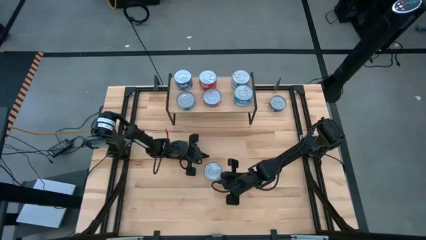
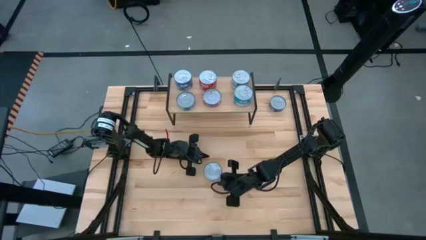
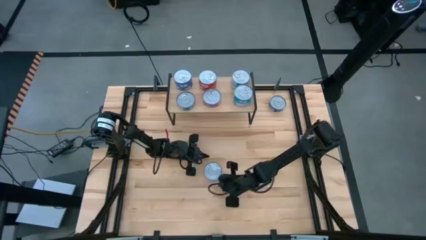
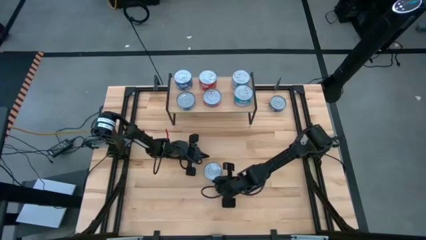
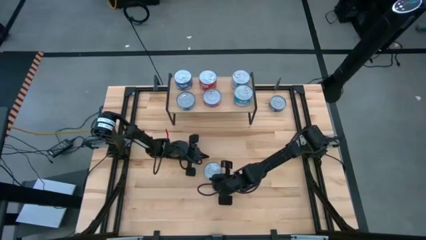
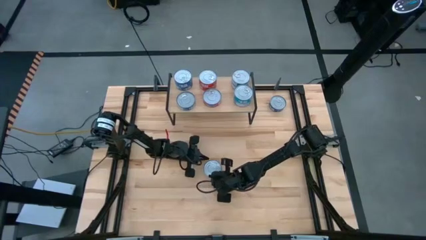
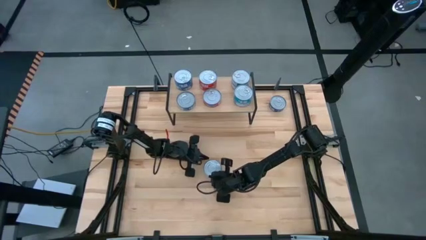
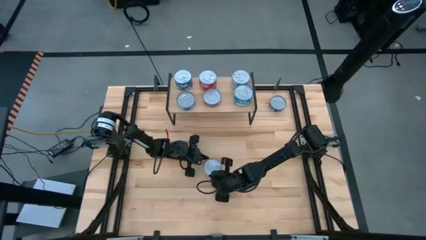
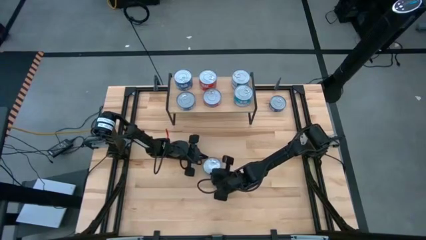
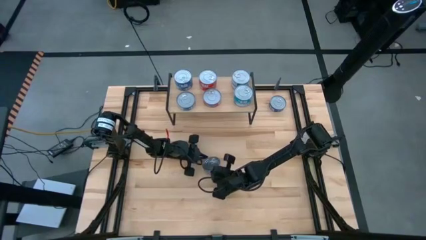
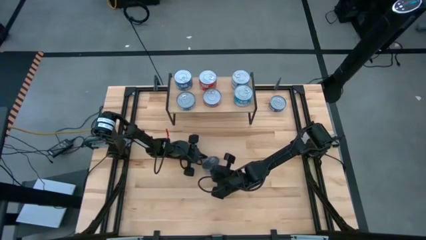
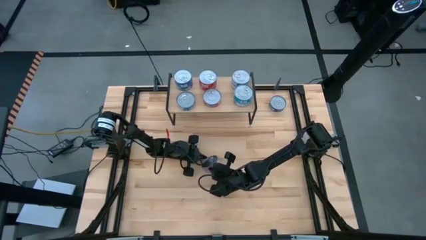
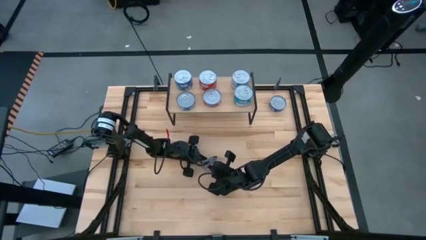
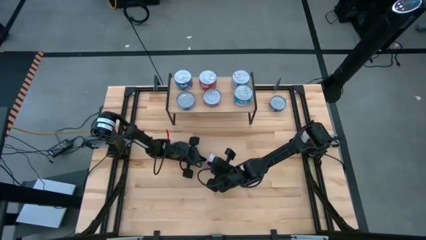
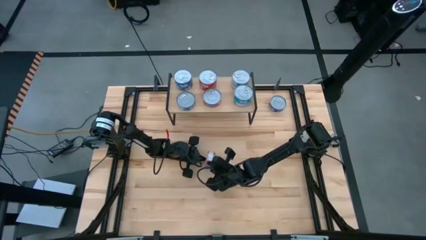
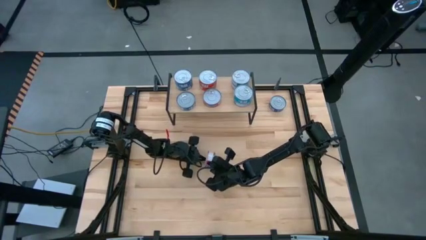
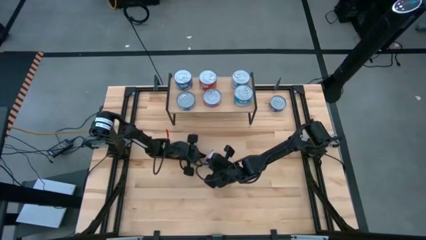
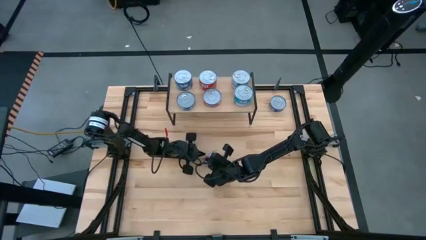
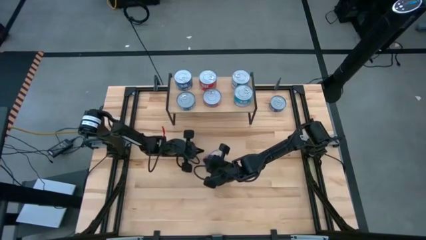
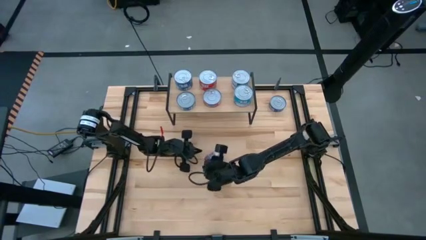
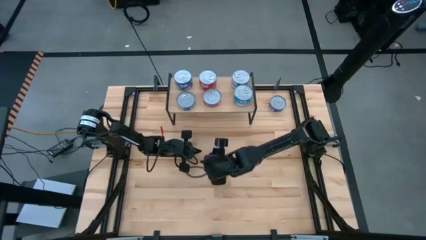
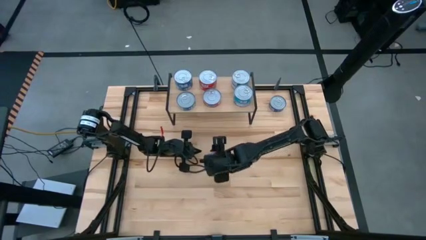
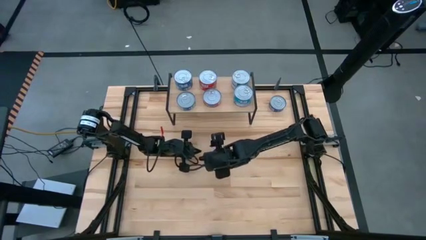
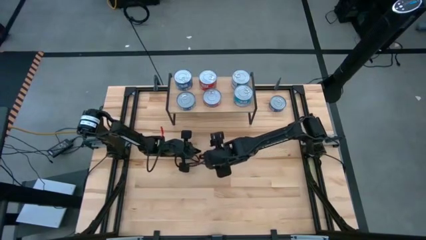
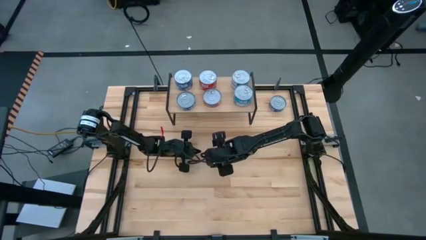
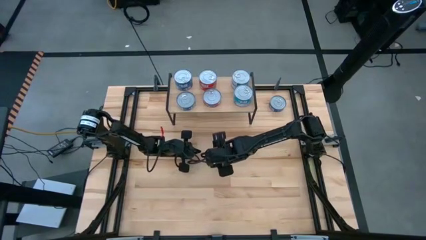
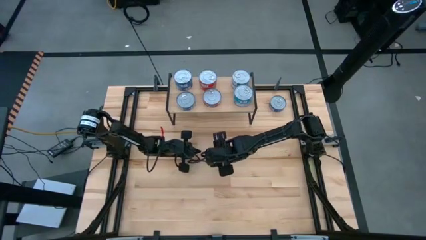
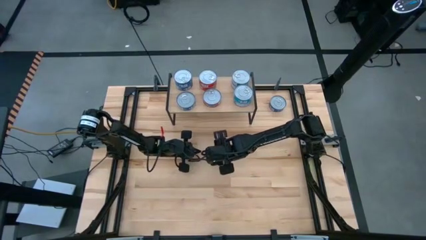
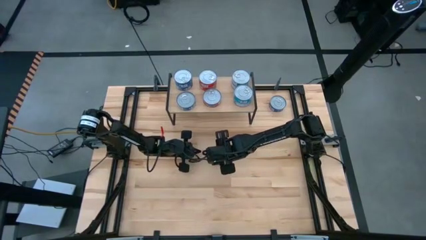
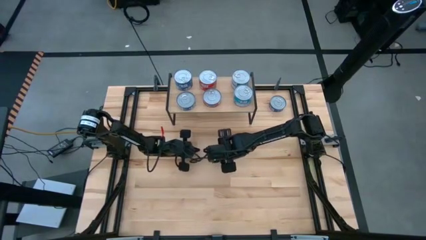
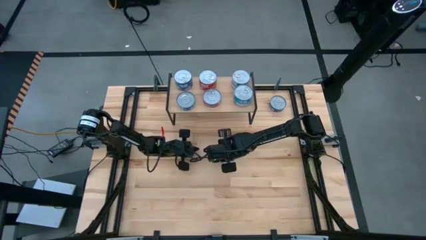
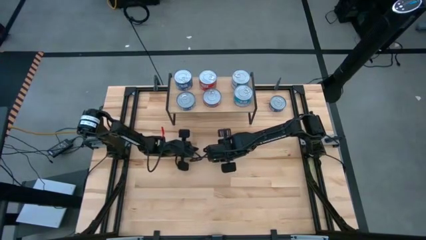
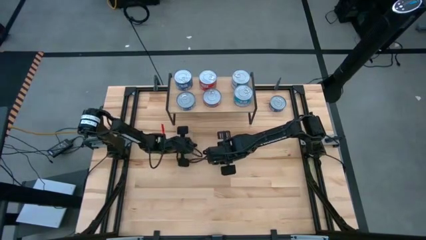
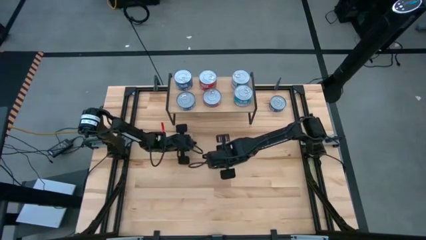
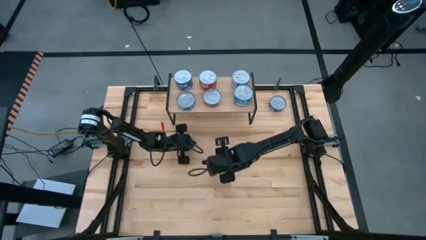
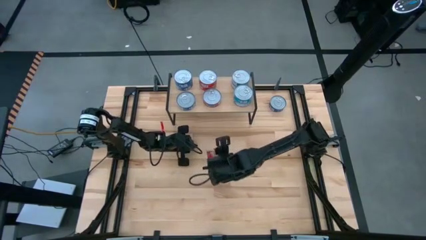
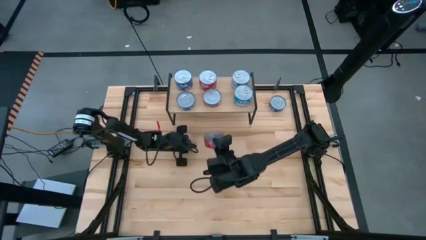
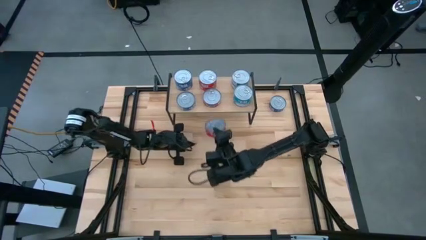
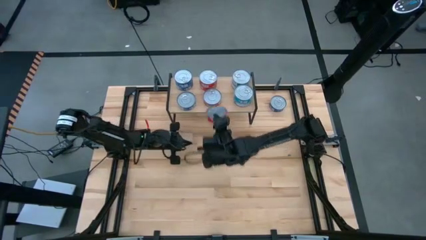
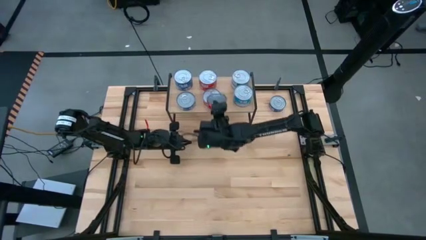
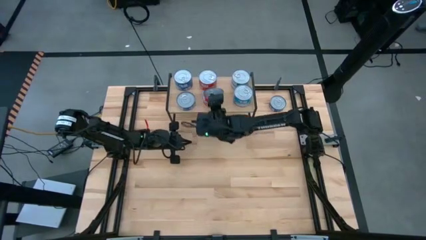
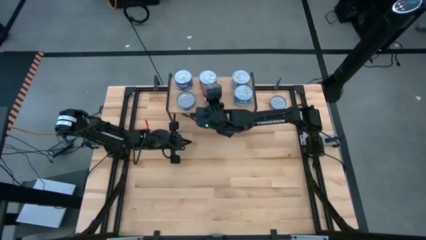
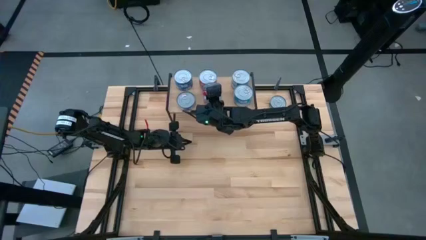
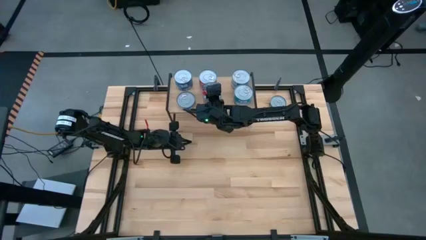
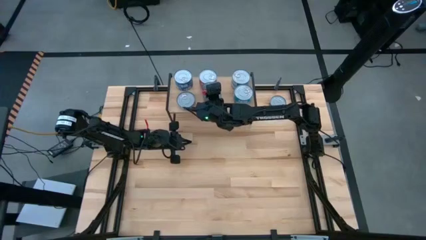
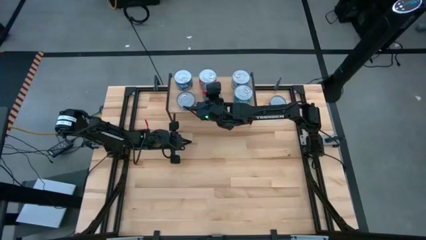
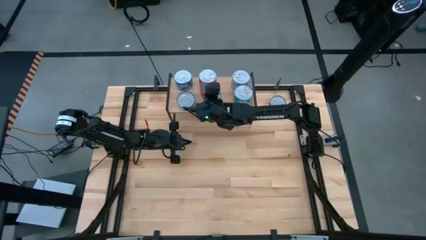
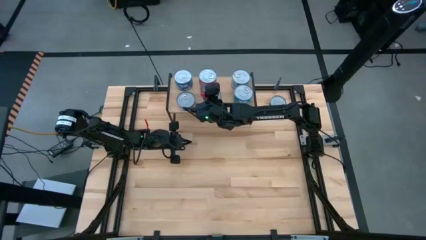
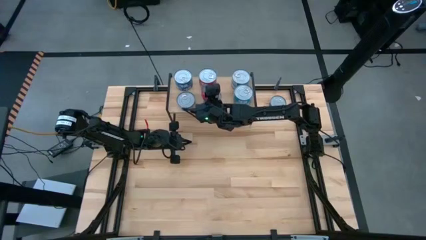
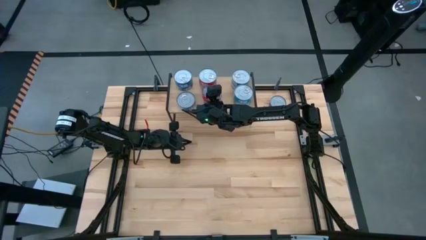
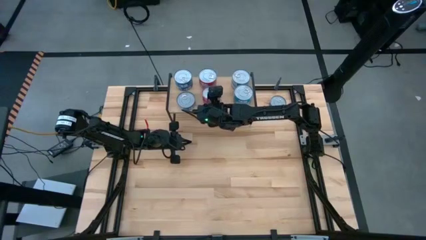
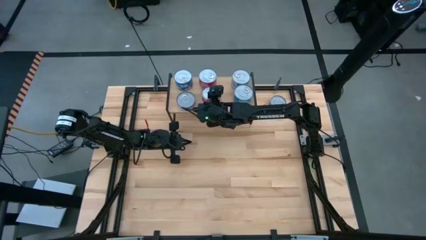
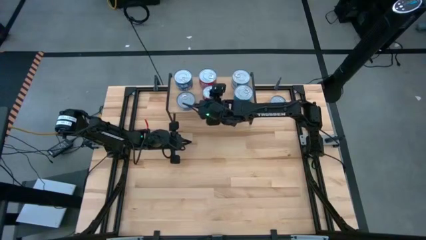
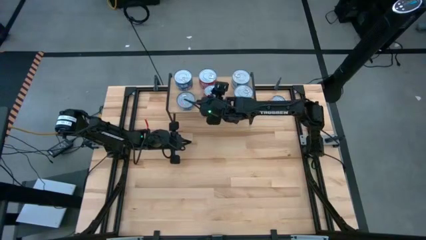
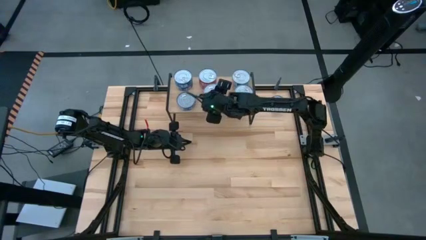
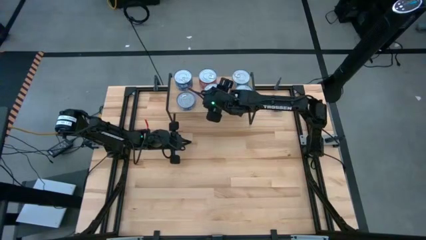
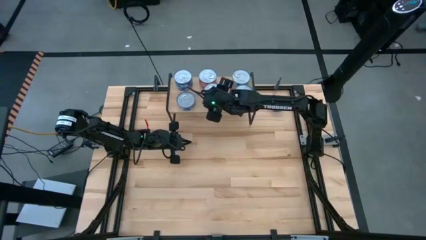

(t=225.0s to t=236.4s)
Task: Stack canned seafood by type on shelf
Stack the red tuna can on top of the red tuna can on the shelf
